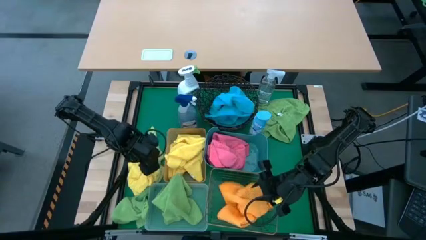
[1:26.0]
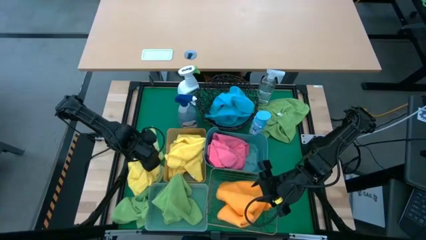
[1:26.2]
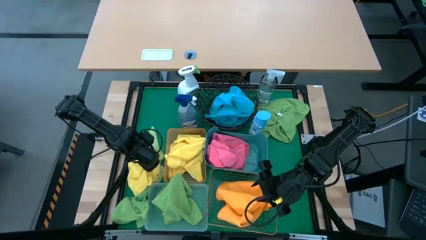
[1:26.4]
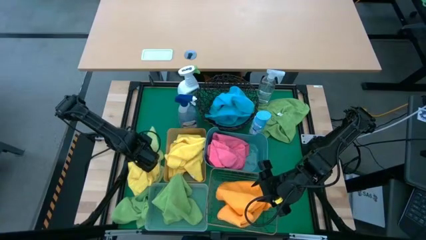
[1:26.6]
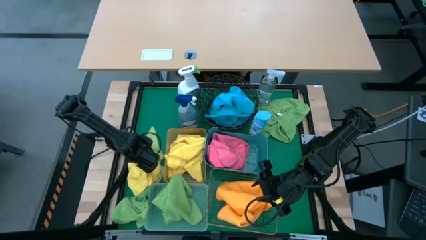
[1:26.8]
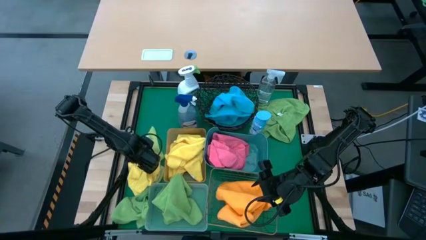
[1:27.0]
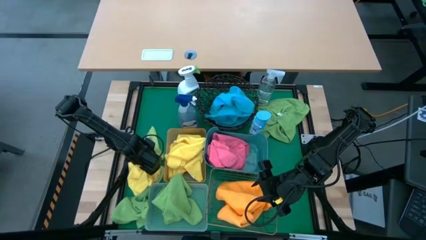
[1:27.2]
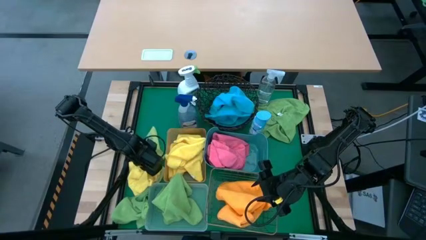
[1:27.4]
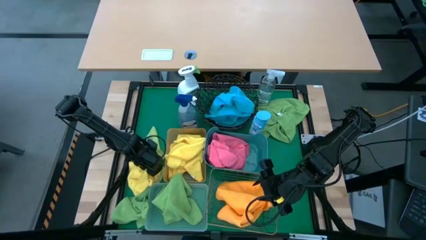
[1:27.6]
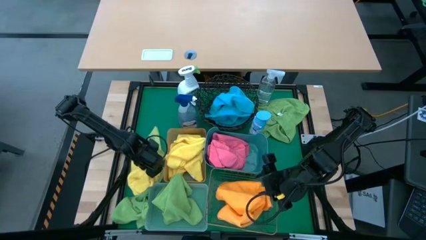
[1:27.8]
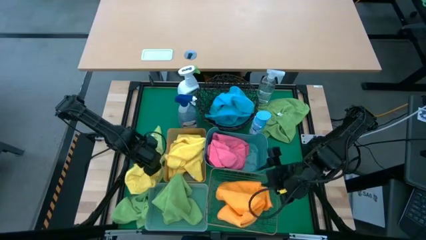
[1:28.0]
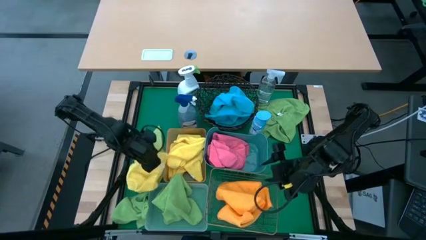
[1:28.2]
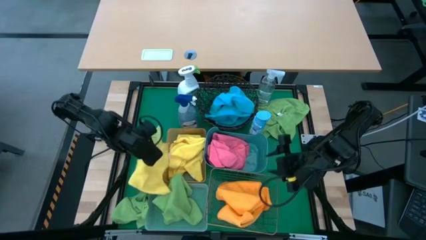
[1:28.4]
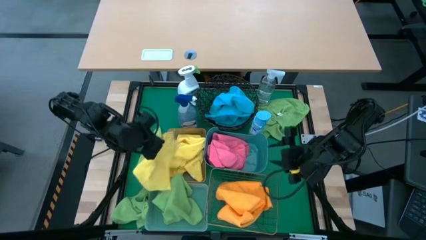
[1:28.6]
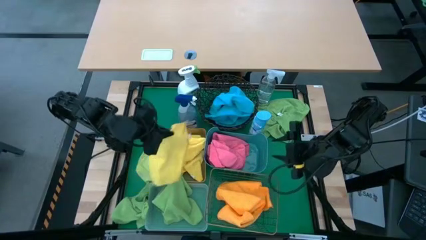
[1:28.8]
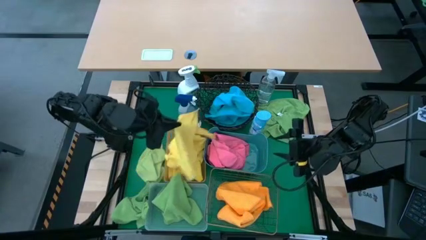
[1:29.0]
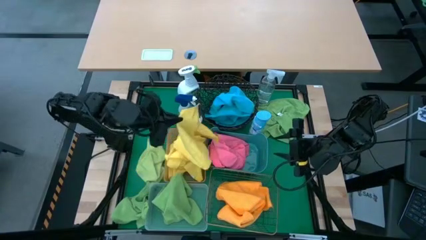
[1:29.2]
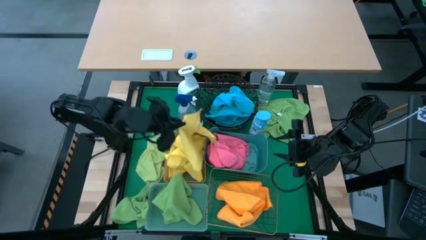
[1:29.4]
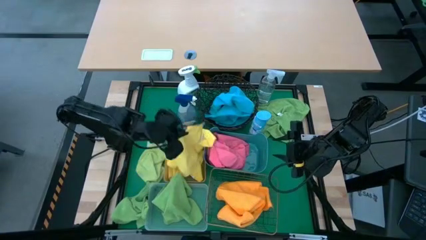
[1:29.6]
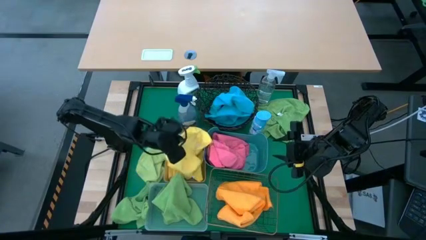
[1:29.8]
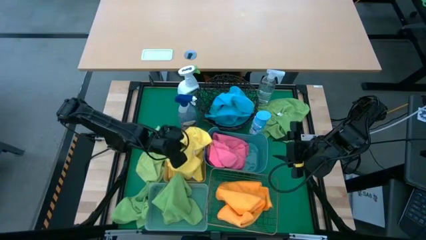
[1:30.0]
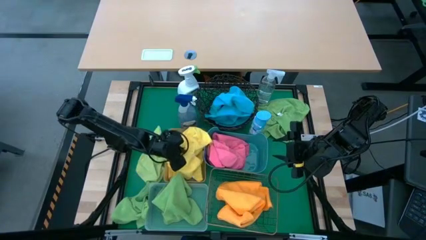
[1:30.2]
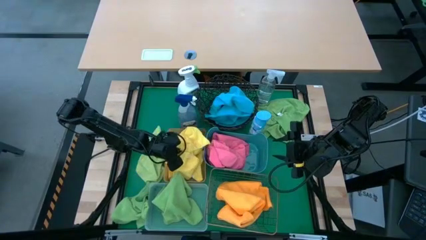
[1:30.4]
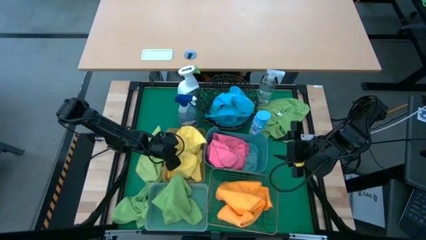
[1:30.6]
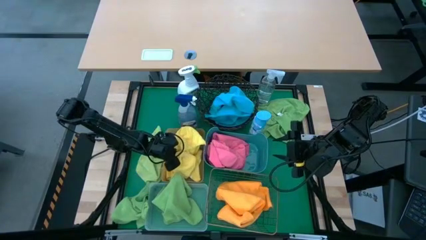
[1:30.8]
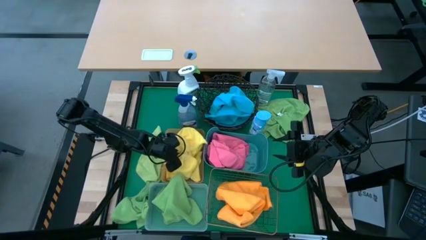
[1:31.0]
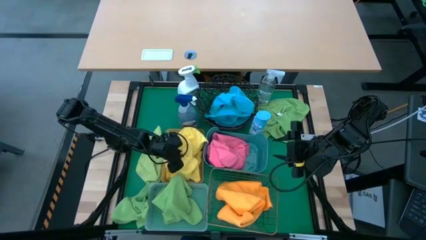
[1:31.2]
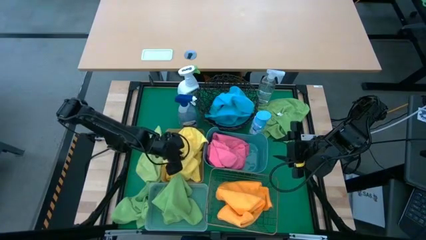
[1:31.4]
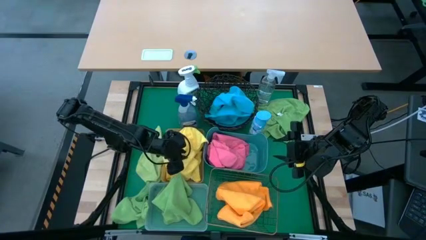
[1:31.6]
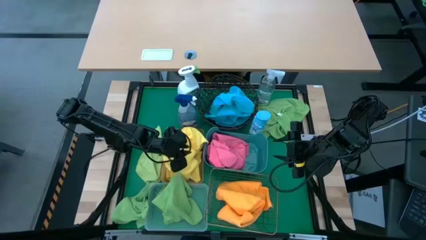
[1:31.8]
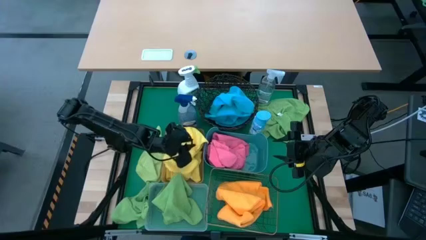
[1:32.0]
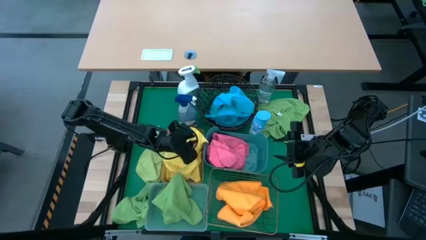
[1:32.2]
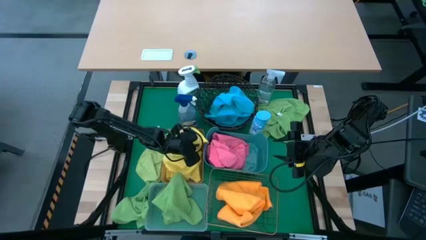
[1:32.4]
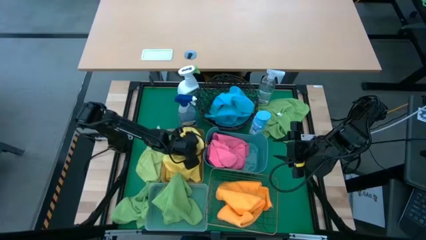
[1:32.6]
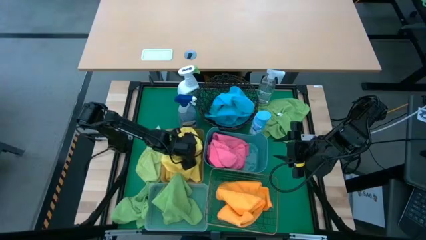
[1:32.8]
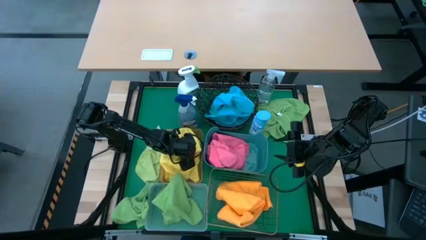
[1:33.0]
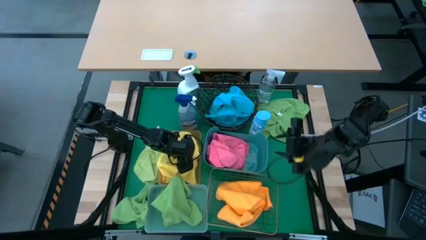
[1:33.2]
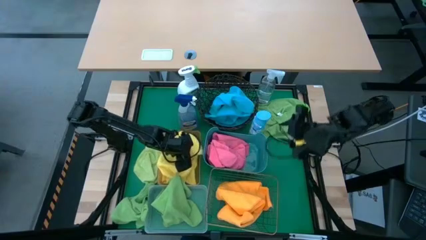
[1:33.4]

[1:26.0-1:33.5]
Task: Sort microfiber towel by color & place in baskets
Put the yellow towel into the orange bin

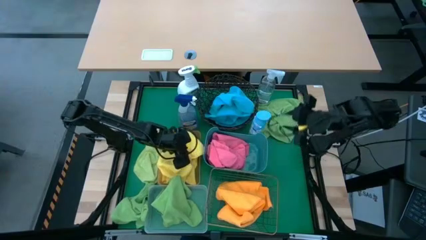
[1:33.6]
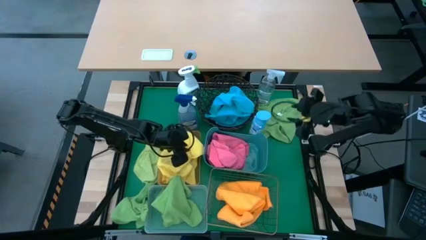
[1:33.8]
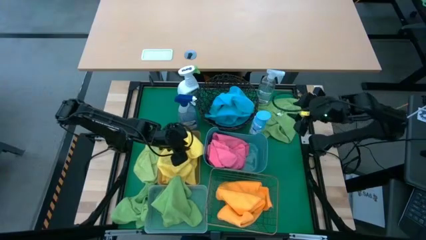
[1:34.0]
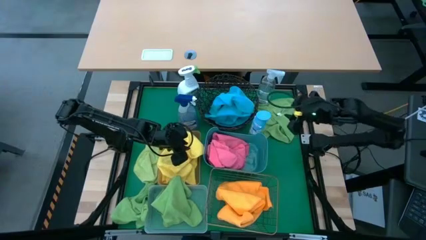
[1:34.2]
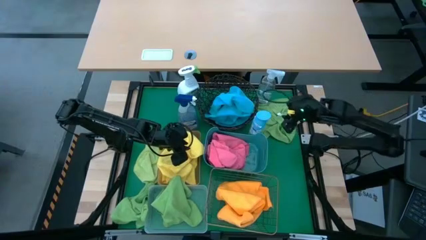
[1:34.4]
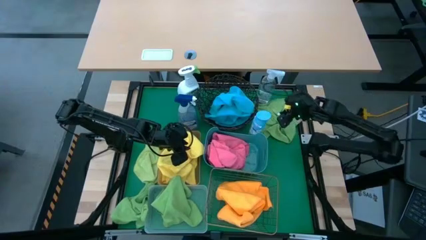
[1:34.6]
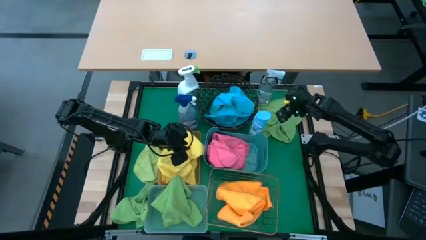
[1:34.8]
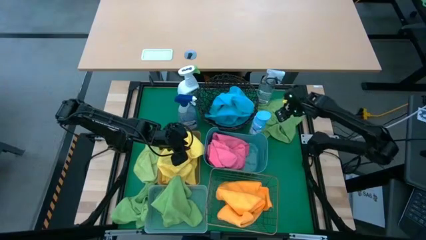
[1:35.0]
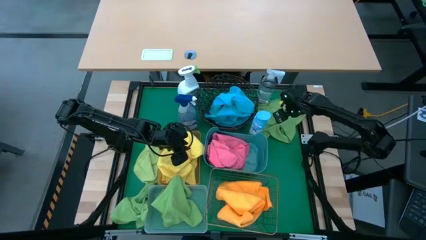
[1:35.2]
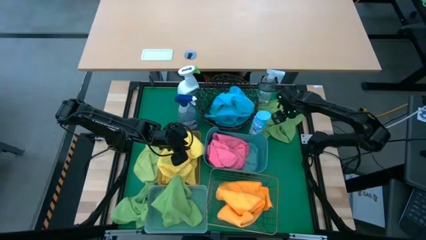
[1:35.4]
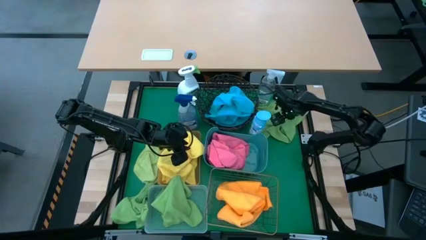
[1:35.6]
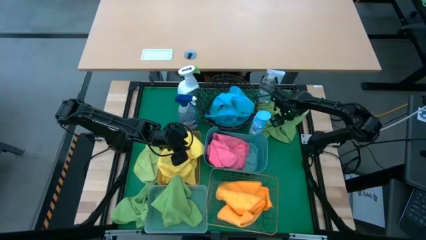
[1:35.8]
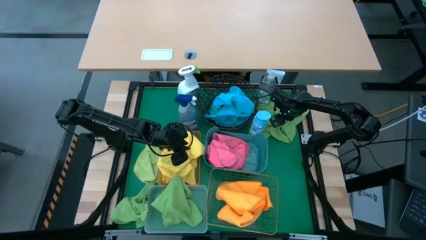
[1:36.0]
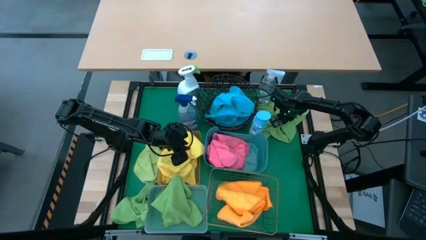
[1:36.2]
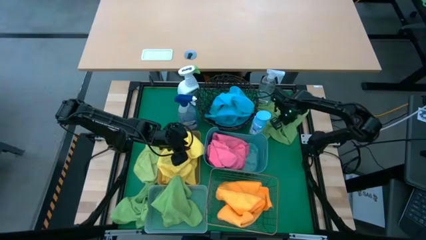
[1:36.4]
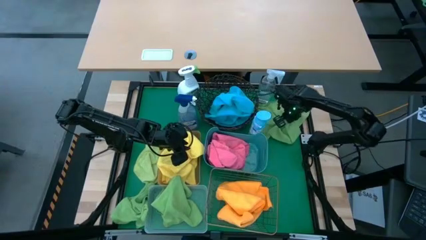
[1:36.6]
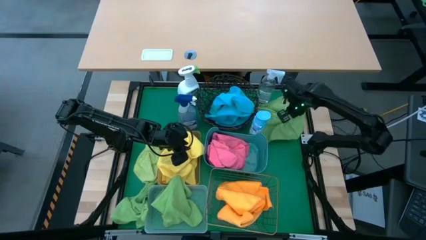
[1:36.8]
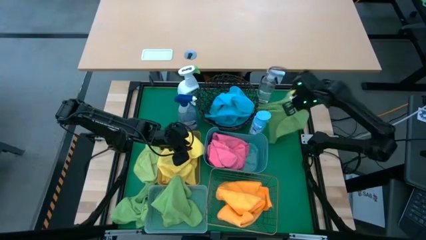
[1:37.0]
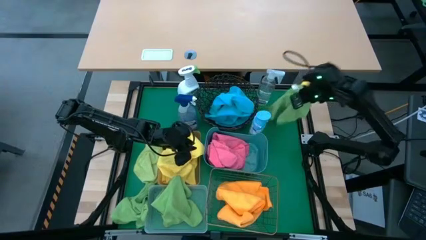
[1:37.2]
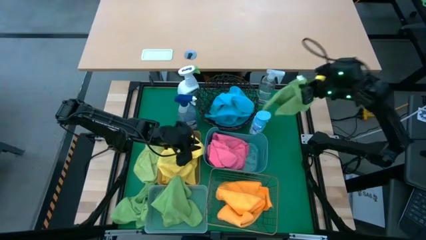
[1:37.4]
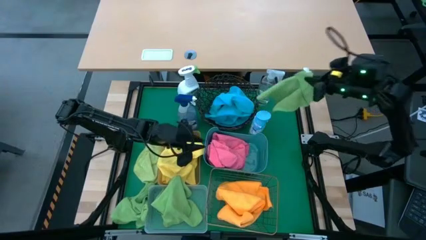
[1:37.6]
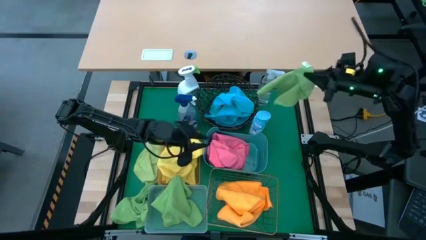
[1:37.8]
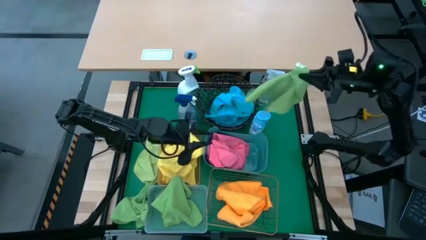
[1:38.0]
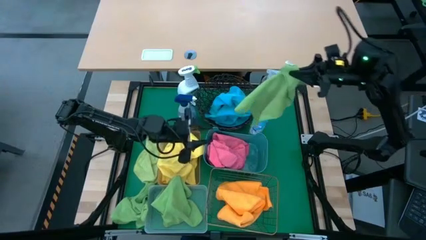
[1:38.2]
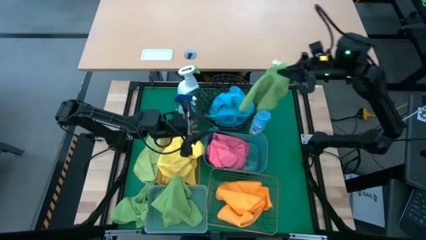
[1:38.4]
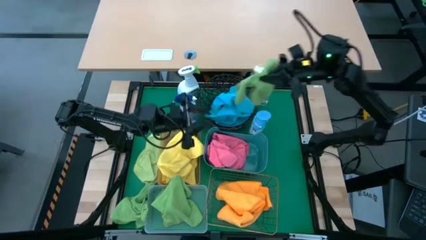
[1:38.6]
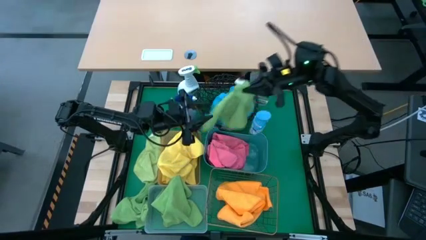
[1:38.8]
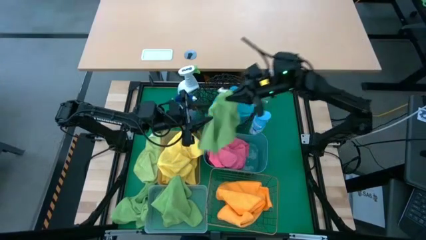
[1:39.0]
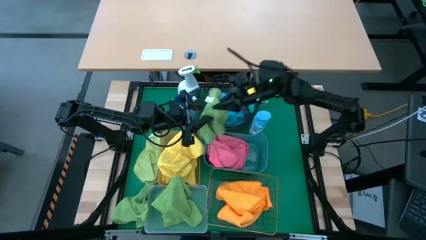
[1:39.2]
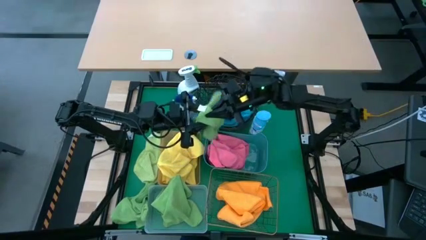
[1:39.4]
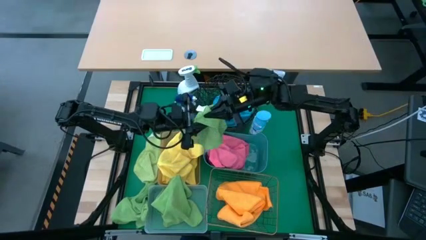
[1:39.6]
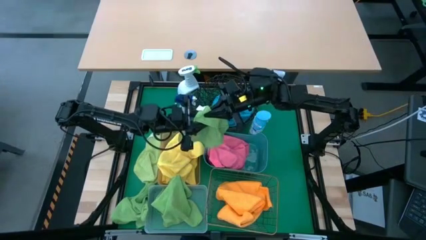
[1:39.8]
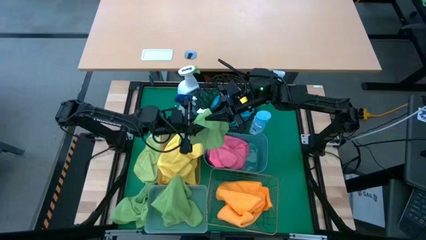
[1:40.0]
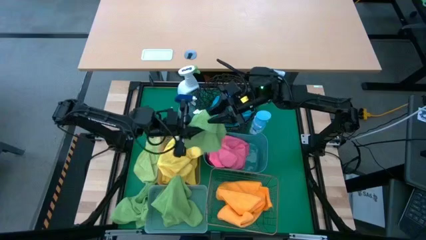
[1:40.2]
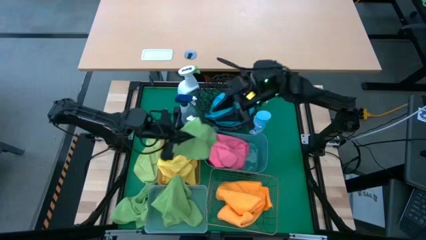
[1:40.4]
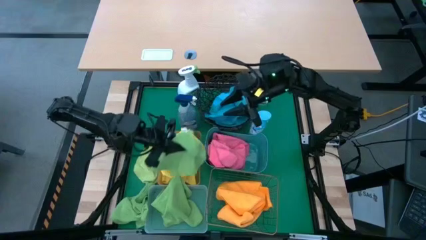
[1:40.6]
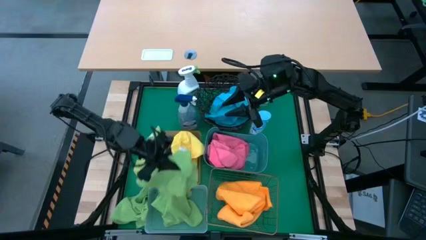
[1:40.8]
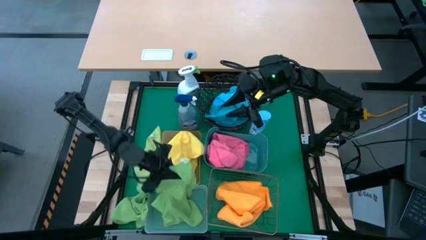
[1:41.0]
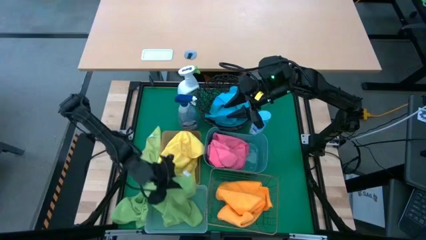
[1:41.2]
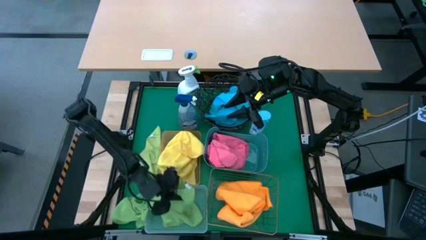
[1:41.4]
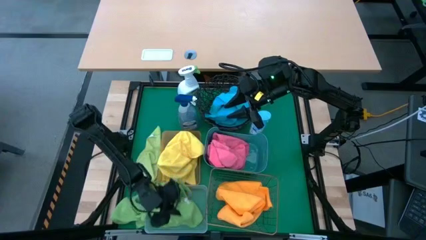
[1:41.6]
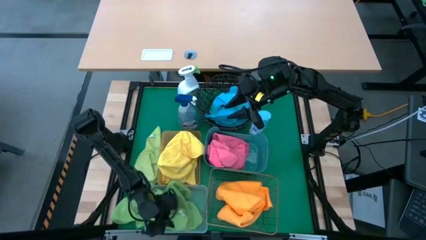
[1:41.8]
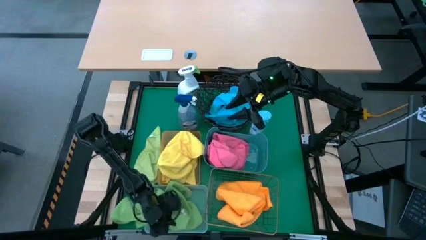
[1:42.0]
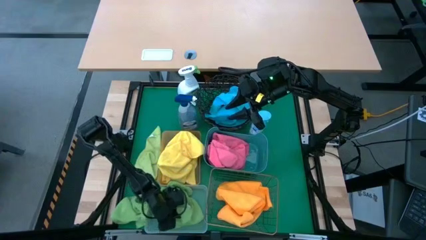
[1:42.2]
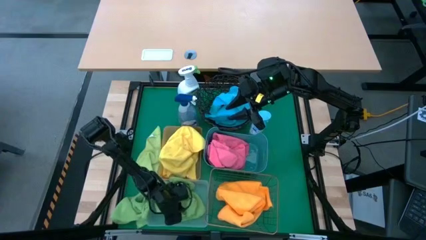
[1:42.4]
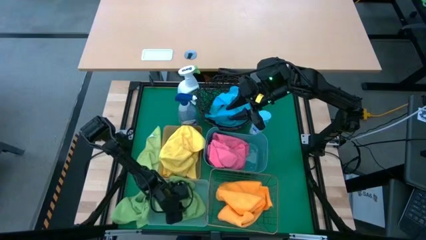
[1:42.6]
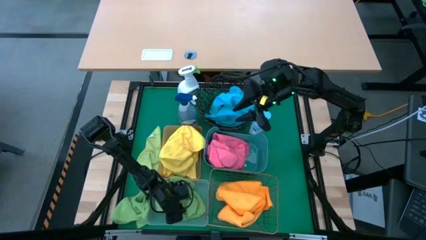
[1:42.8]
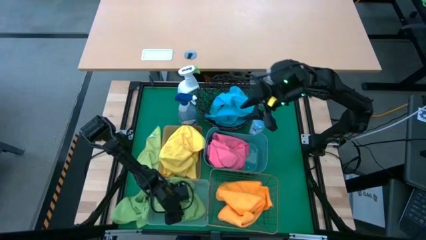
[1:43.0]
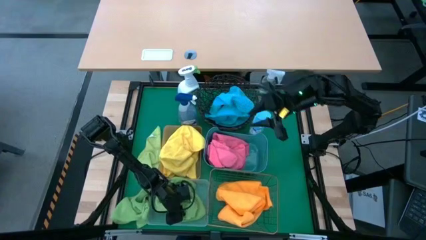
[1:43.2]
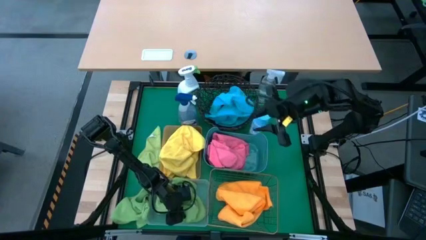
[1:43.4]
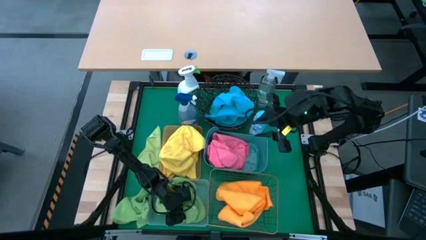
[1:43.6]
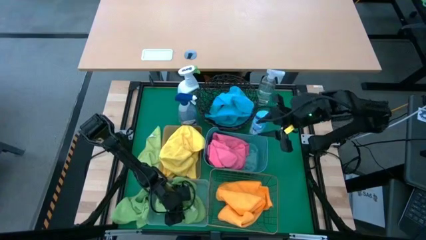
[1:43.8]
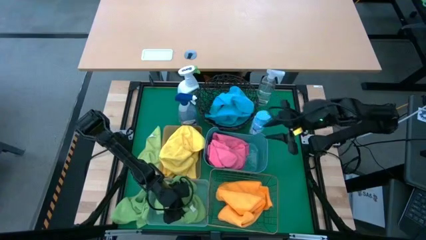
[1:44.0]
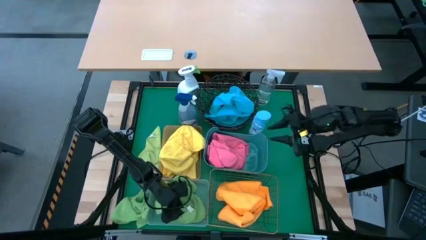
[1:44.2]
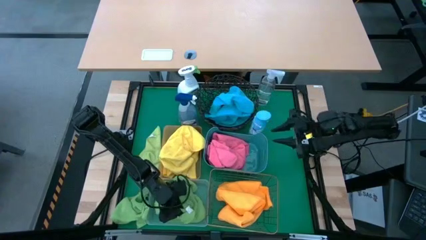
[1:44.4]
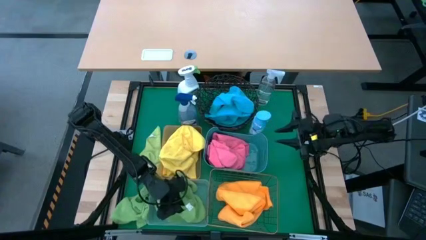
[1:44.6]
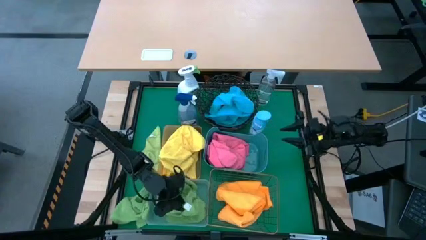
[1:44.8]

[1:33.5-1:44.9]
Put the top green towel into the white bin
